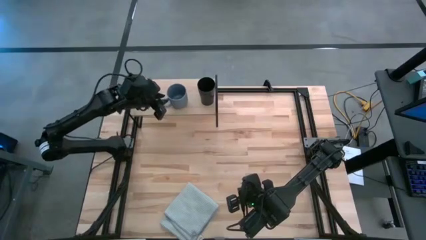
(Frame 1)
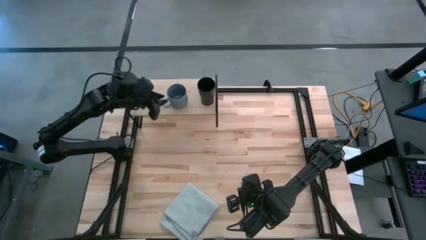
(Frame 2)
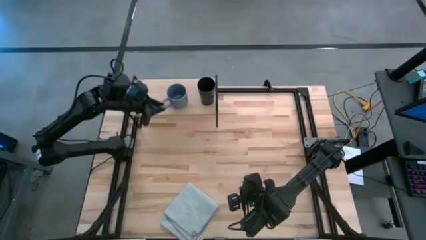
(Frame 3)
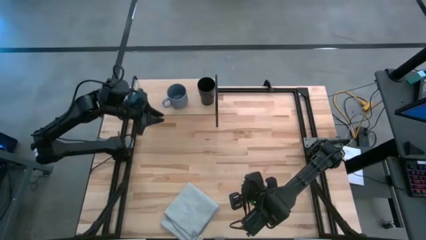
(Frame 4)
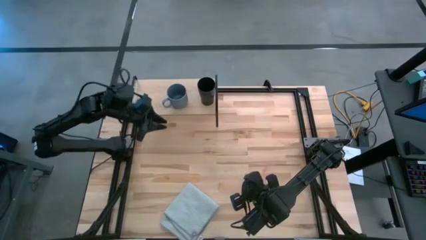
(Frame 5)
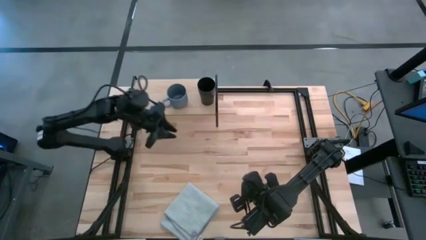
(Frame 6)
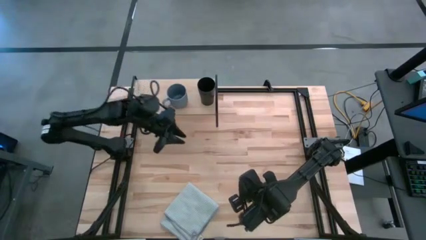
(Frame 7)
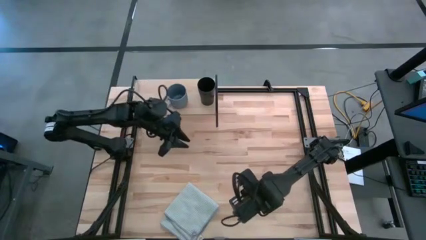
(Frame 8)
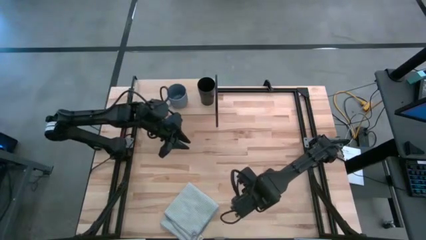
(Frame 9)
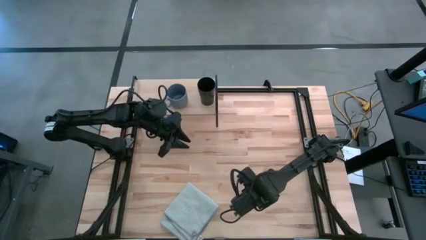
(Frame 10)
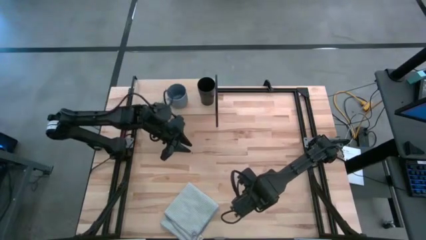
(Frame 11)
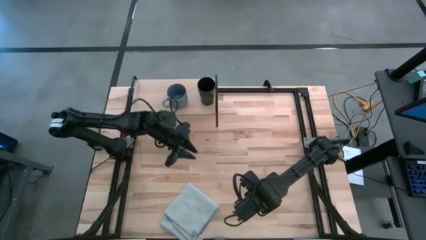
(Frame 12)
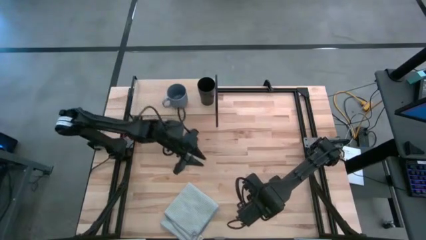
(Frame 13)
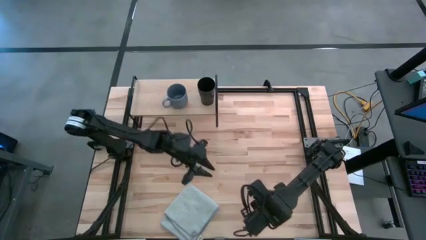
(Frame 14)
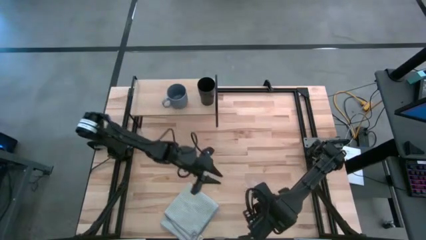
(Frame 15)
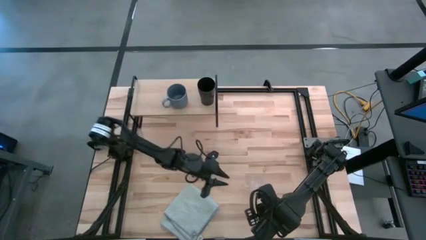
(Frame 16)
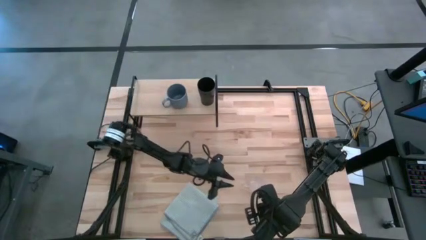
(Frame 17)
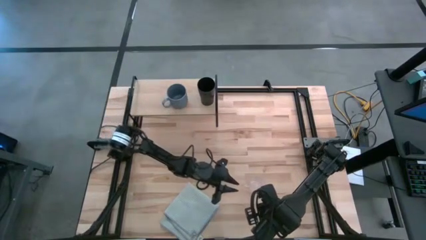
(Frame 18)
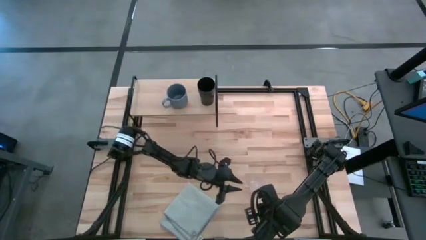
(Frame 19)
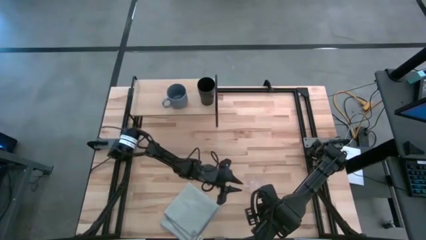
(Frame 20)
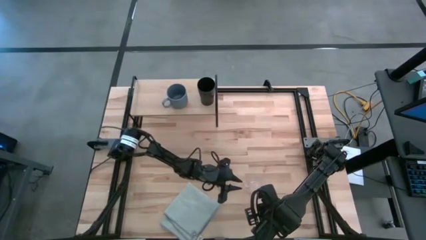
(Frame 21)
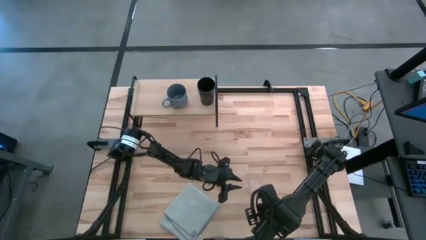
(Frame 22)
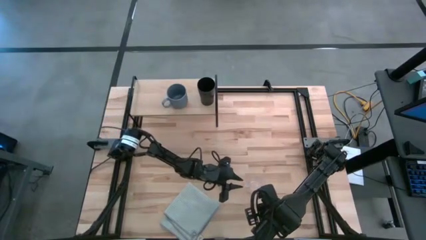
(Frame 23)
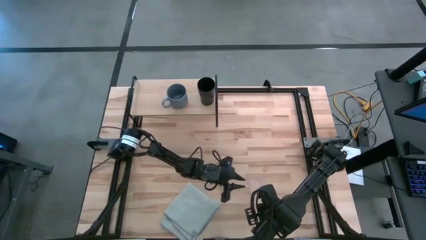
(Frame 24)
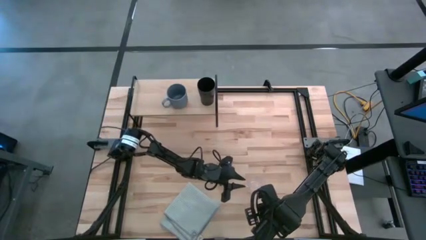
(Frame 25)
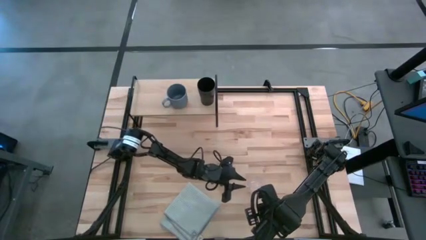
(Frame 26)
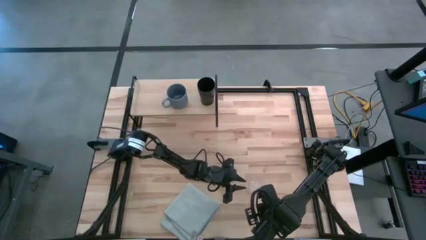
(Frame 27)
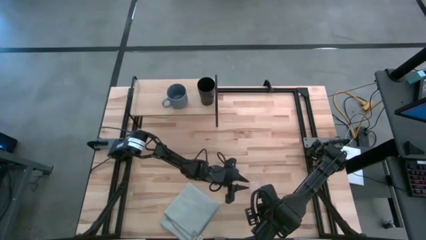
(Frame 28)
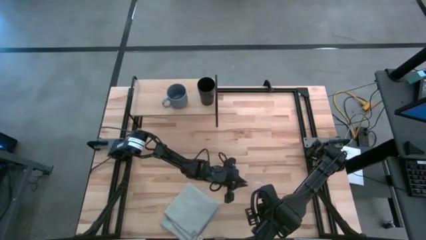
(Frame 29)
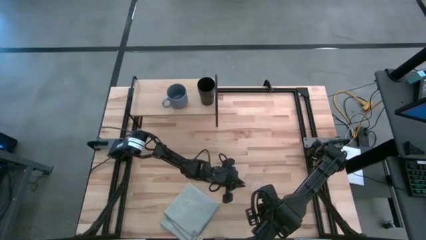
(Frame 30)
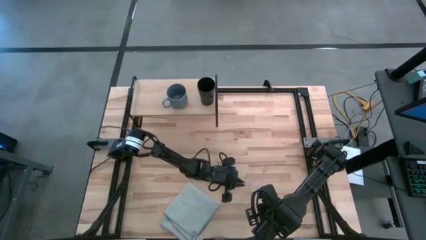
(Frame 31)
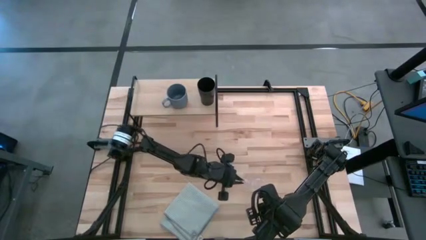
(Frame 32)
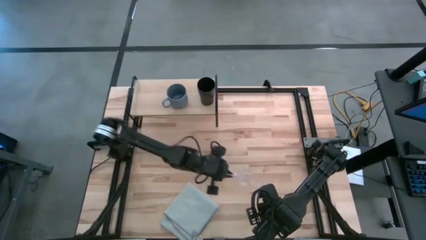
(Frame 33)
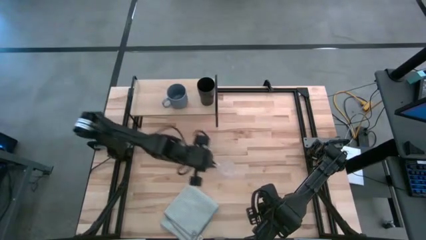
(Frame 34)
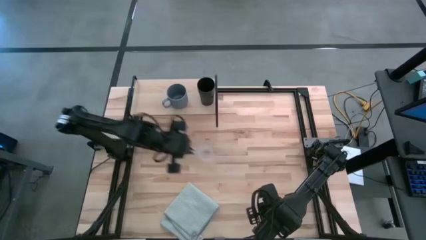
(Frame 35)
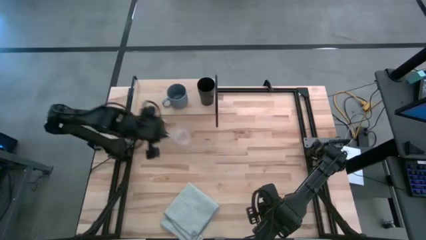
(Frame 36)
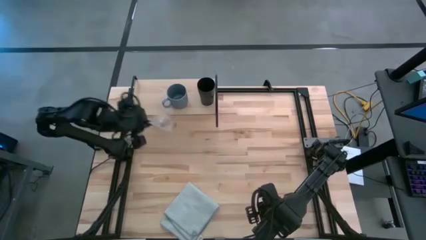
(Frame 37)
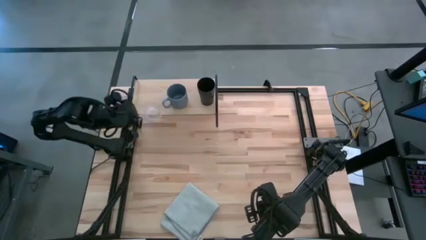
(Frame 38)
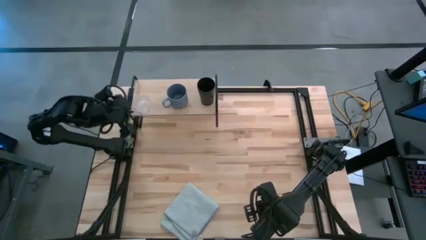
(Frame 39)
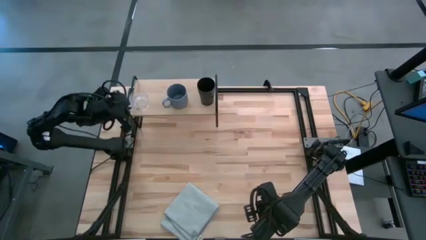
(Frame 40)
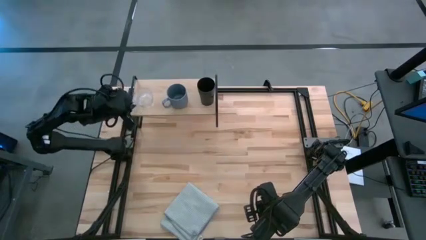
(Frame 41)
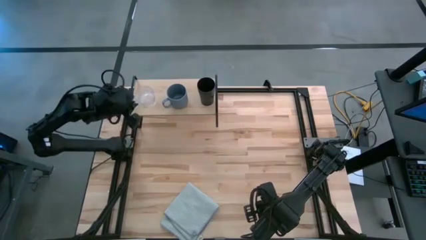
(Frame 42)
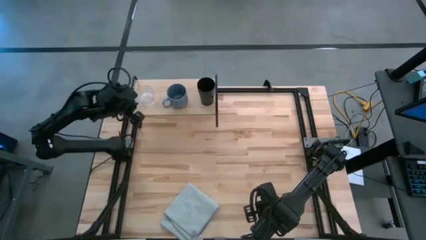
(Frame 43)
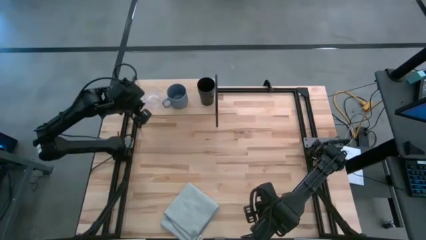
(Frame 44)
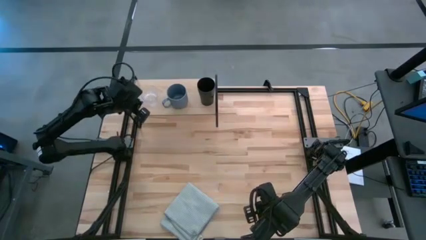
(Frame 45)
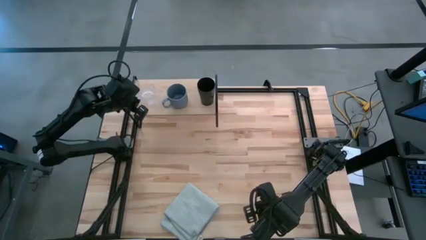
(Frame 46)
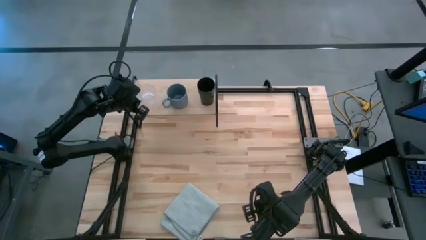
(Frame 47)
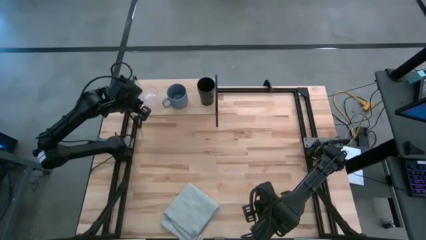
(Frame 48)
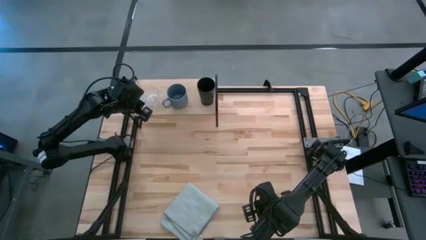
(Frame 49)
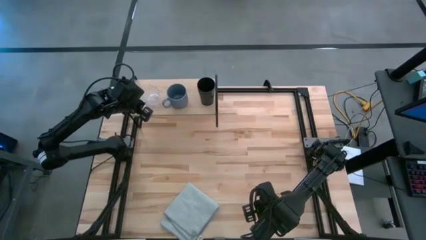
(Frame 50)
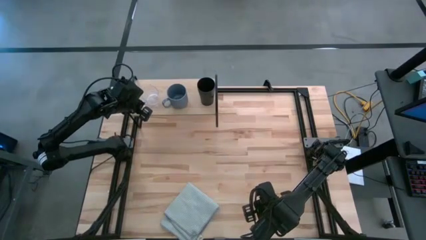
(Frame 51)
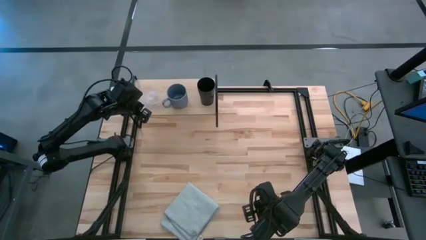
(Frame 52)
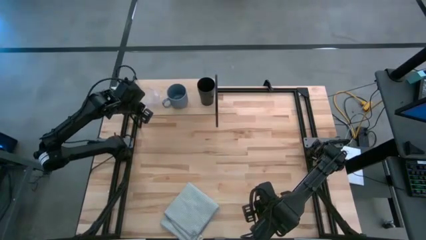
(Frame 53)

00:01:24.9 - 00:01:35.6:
Task: Stack small to large cups/mugs on shelf
Put the transparent mug on the shelf

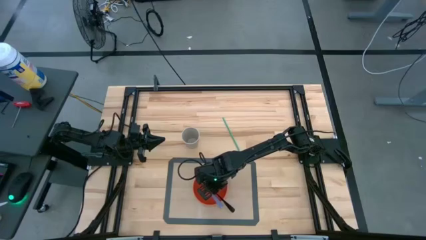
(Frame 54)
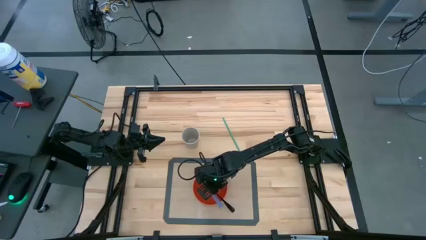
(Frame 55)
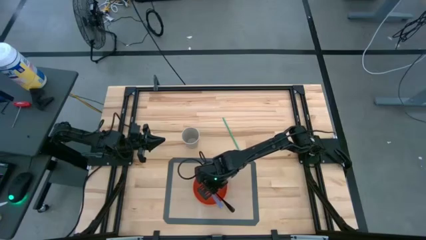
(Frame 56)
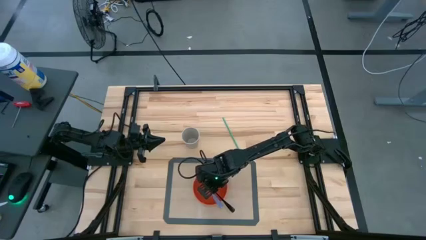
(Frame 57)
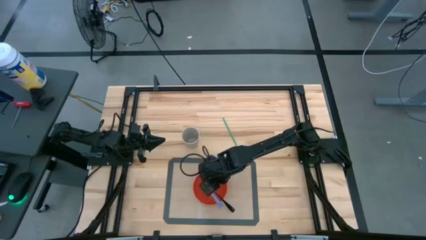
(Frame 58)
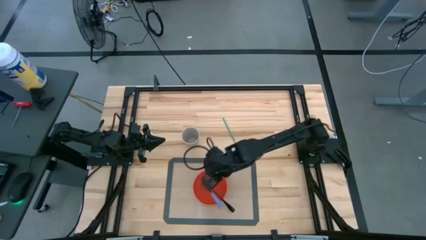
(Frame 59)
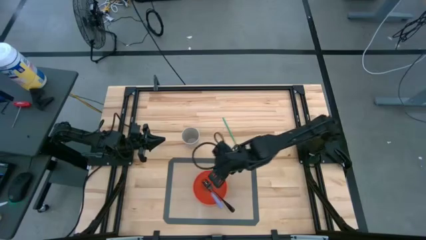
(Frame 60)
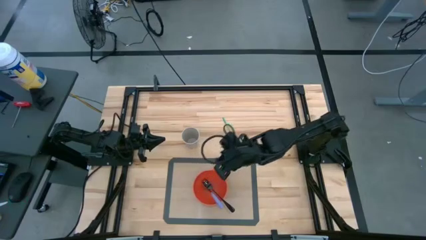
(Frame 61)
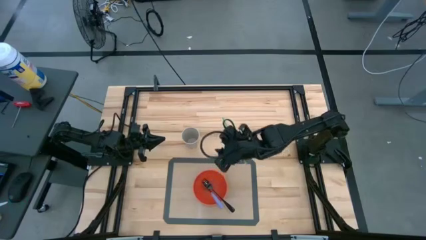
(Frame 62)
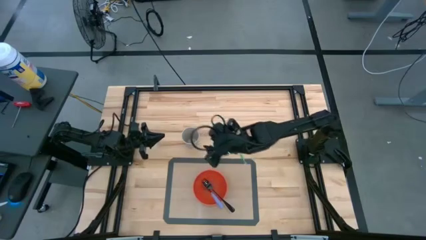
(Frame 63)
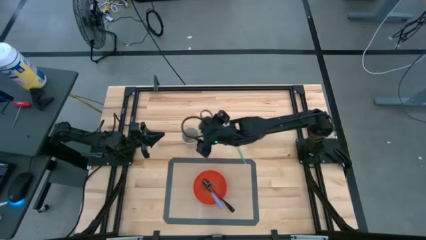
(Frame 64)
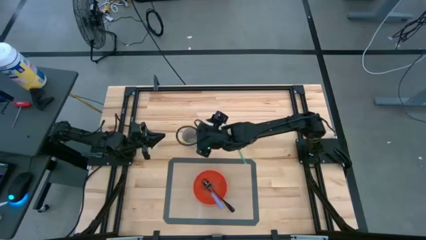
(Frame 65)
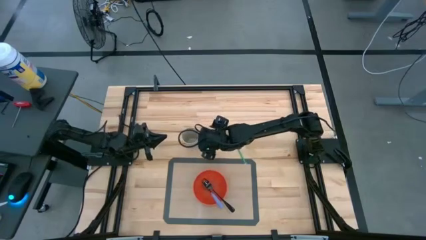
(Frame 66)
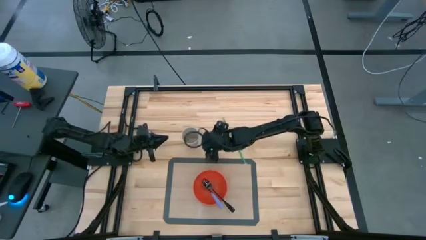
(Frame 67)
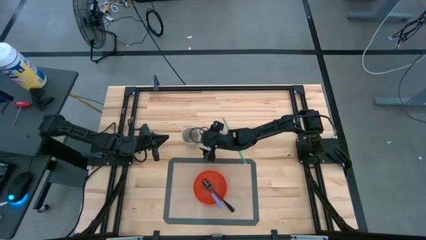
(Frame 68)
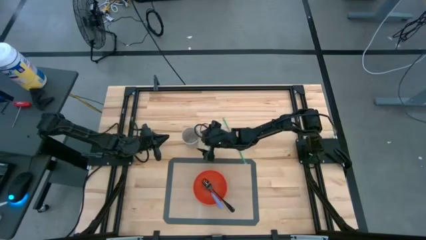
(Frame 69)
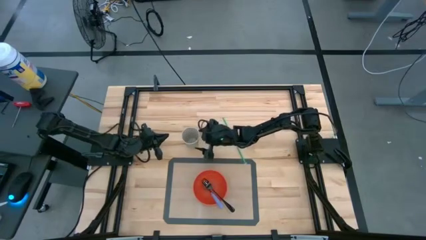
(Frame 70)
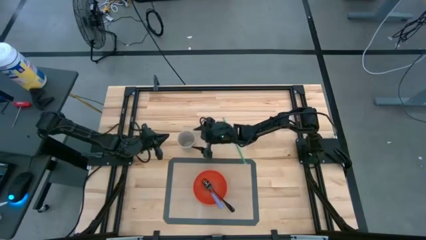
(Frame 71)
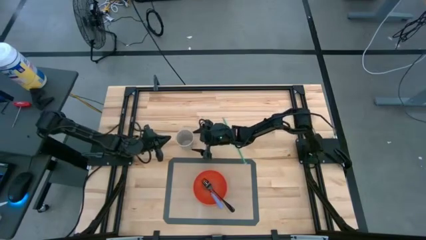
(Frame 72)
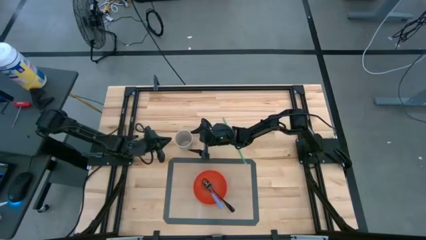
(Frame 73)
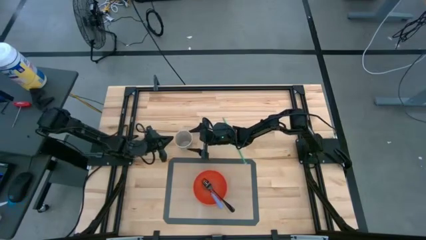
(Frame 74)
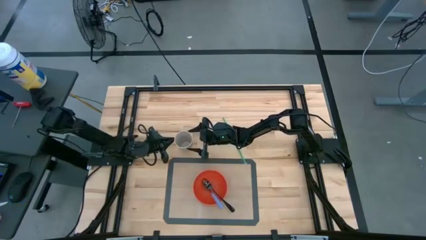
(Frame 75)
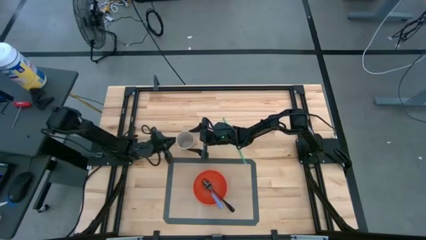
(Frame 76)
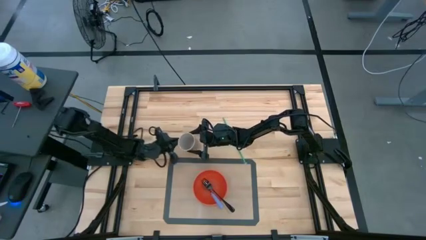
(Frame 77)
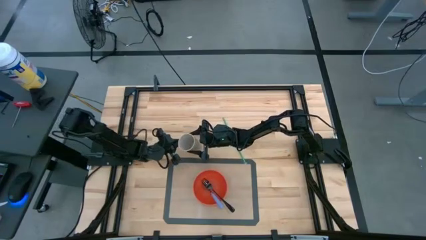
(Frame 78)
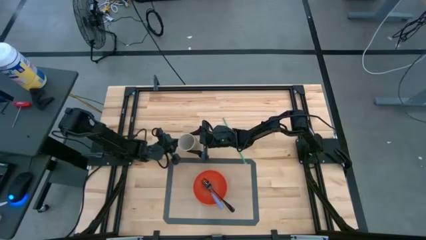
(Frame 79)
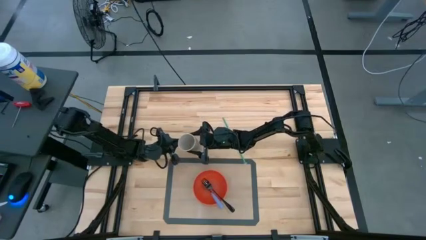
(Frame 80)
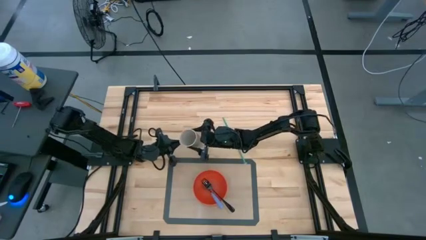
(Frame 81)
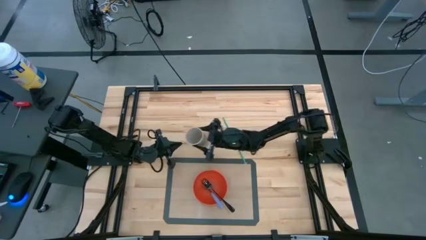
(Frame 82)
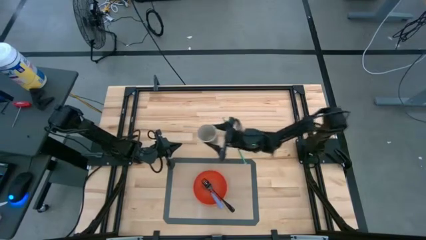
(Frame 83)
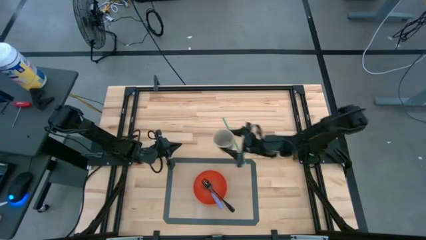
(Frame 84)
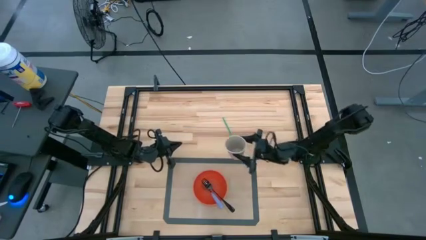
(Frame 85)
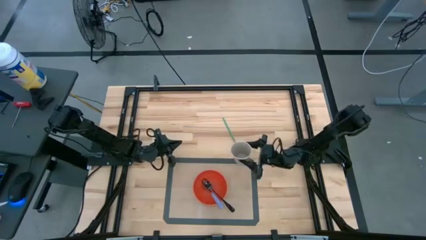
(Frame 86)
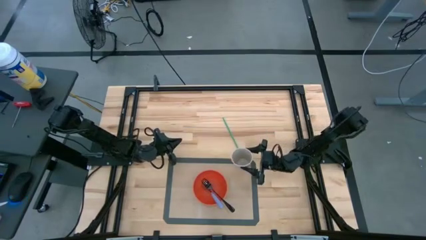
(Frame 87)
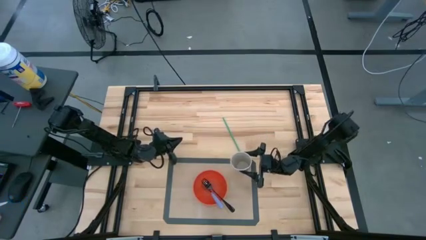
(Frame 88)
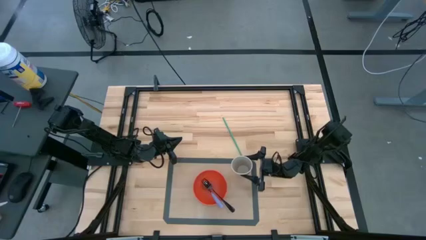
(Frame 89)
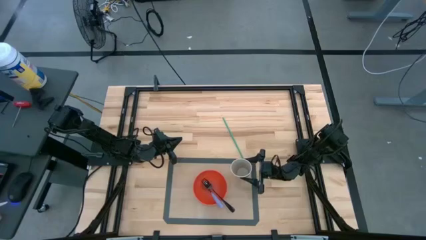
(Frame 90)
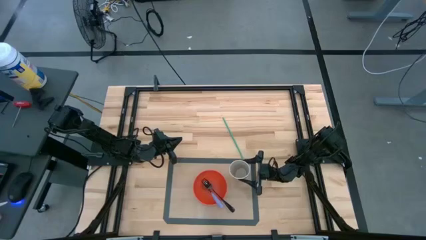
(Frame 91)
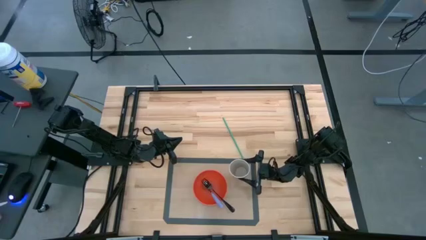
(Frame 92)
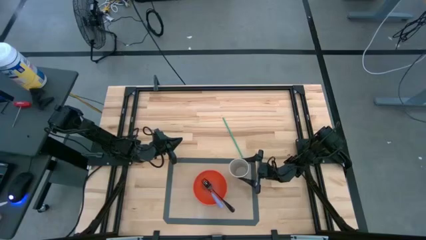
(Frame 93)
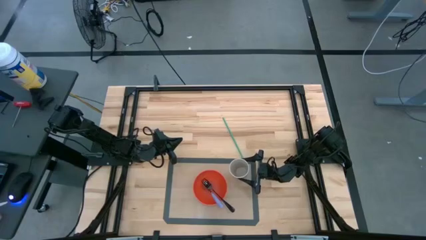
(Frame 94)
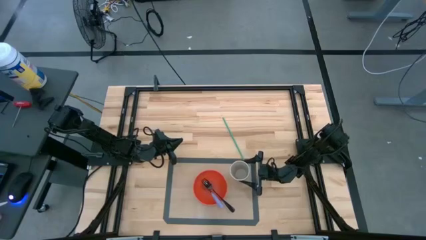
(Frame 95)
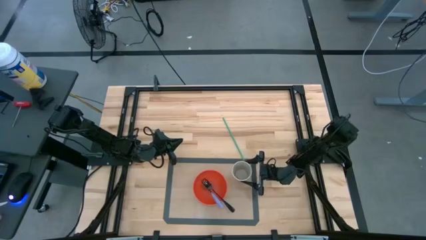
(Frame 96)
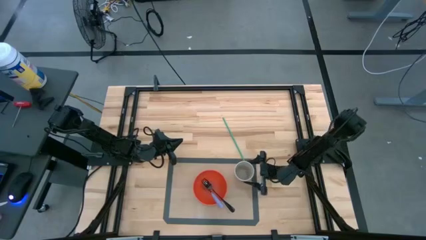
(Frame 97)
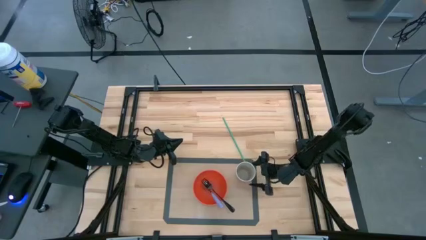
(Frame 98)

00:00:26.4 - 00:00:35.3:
Task: Pick & Place Utensil
Put the white cup on top of the orange bowl on the transparent mat
